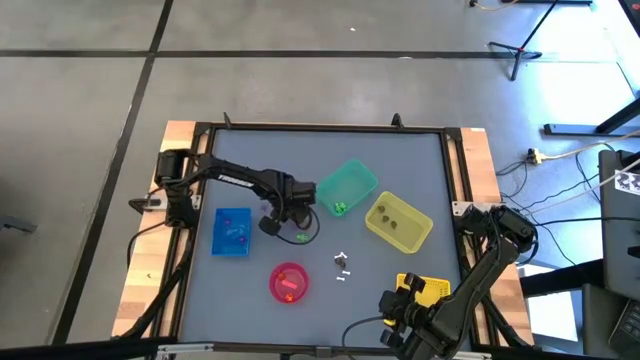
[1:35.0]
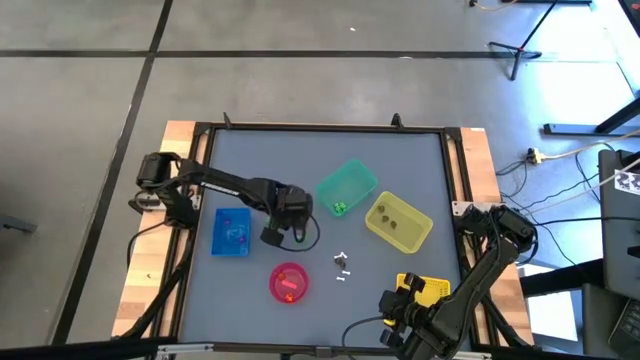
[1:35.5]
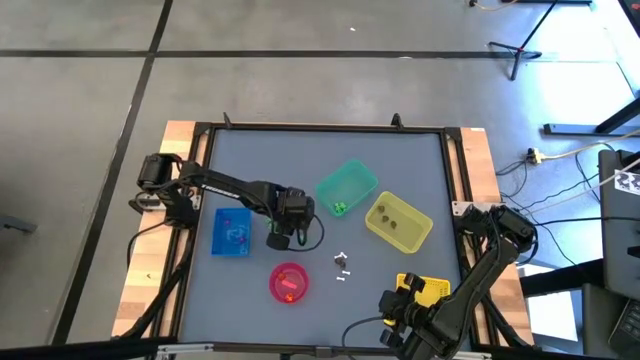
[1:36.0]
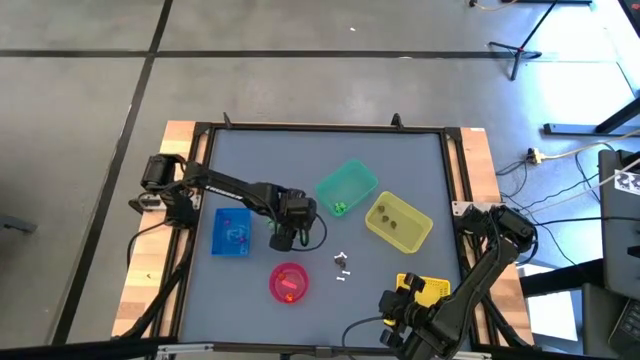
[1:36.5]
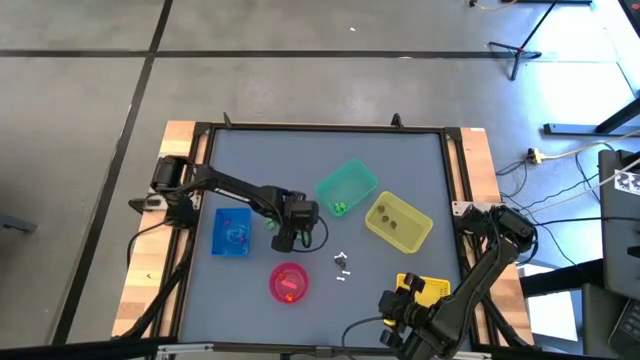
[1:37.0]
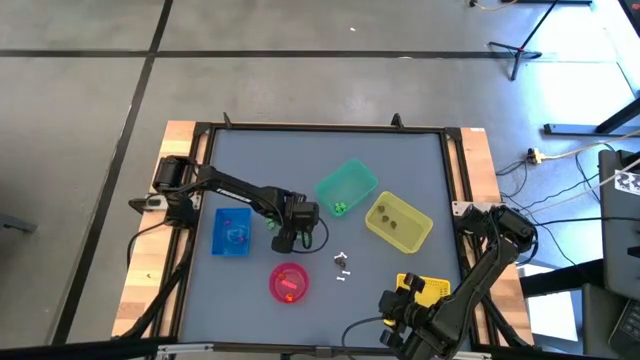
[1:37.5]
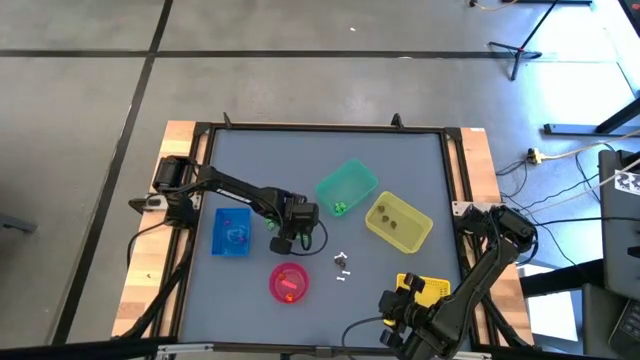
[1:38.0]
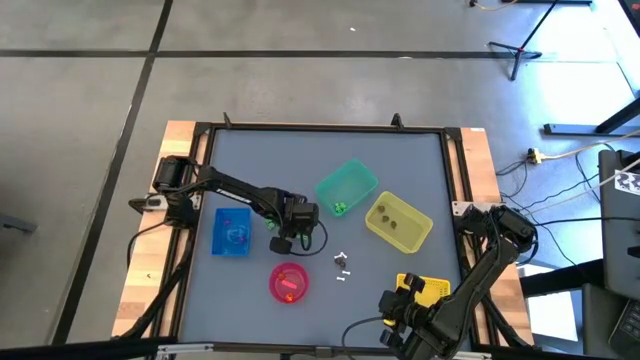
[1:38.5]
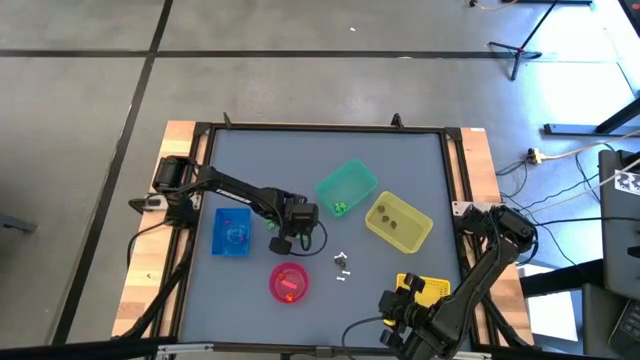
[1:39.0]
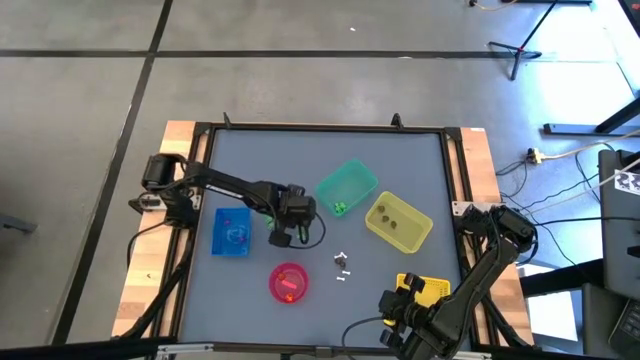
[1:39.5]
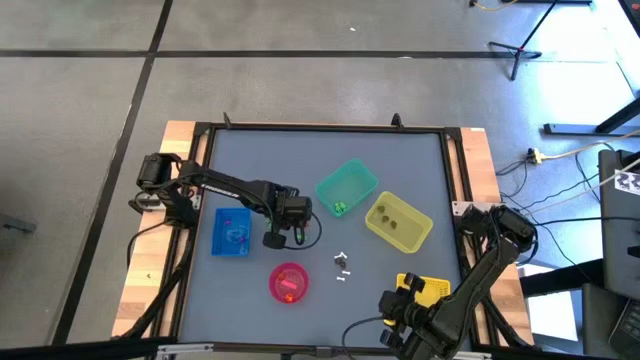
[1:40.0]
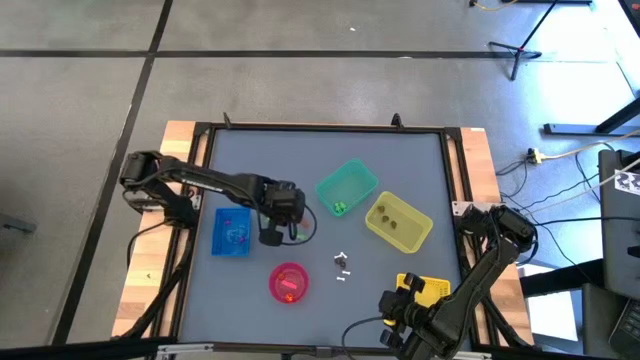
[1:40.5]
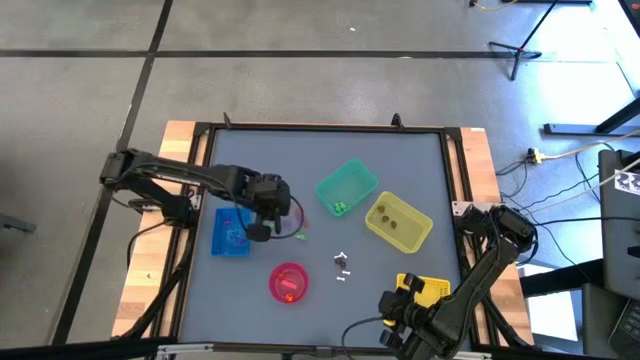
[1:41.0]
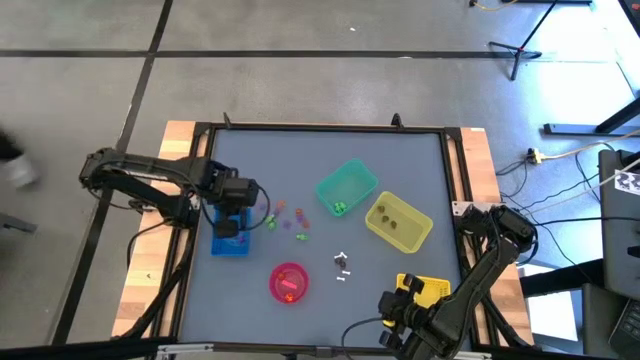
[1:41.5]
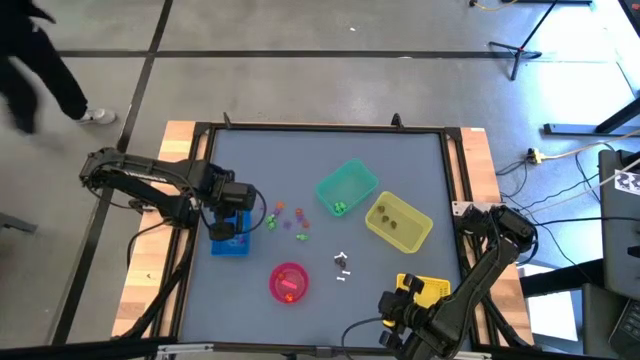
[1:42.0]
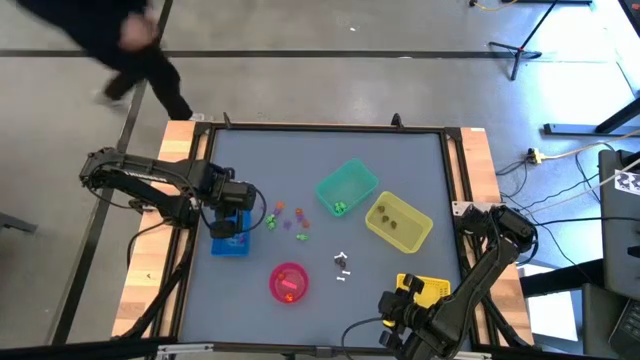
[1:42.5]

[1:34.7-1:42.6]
Task: Sort Halloween decoration
Put the violet spider toy into the blue bin

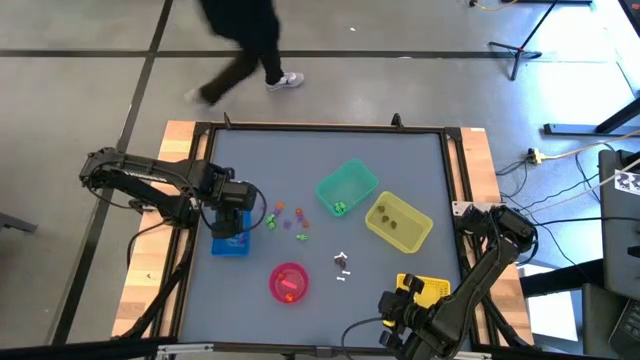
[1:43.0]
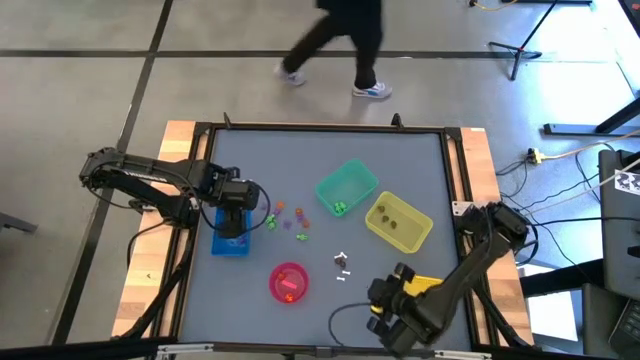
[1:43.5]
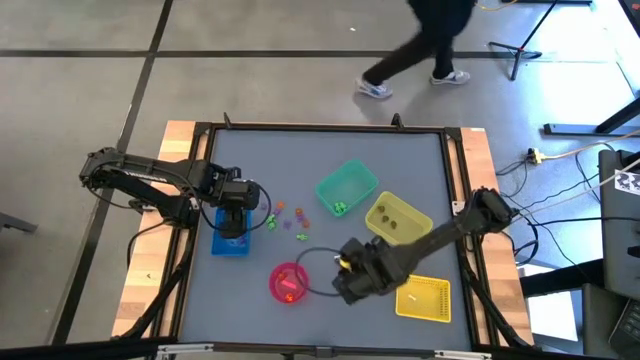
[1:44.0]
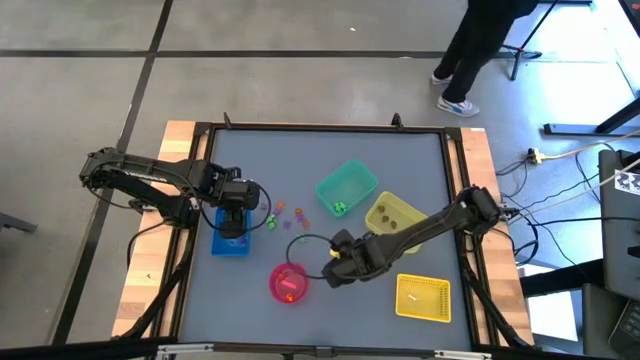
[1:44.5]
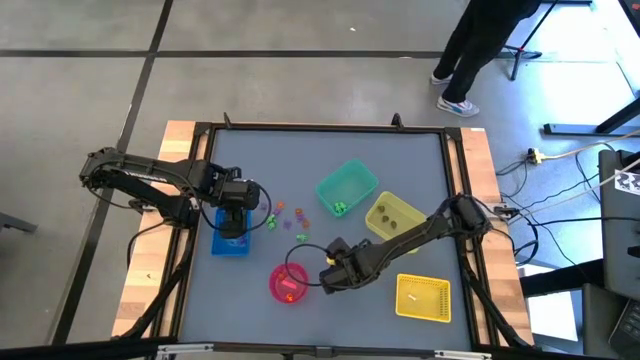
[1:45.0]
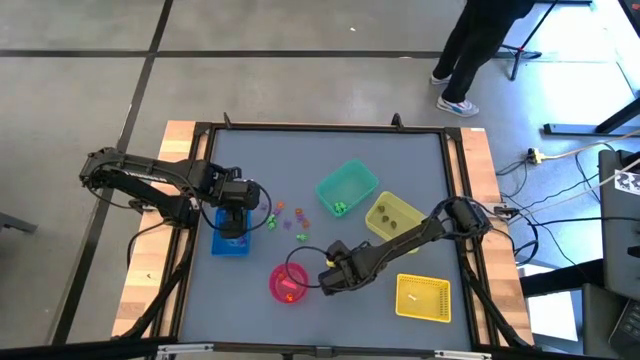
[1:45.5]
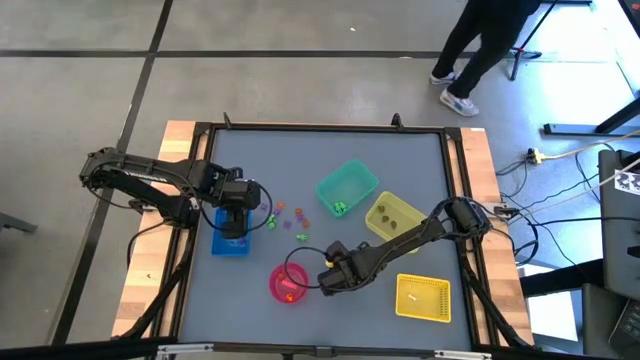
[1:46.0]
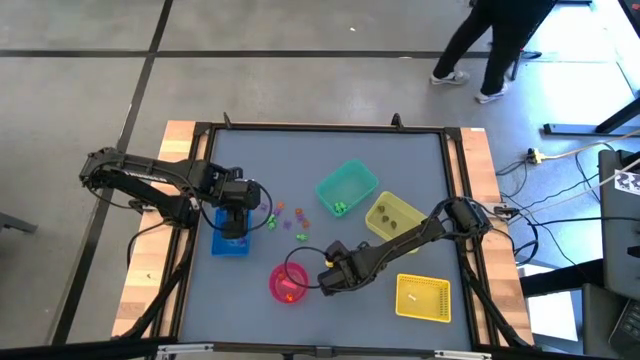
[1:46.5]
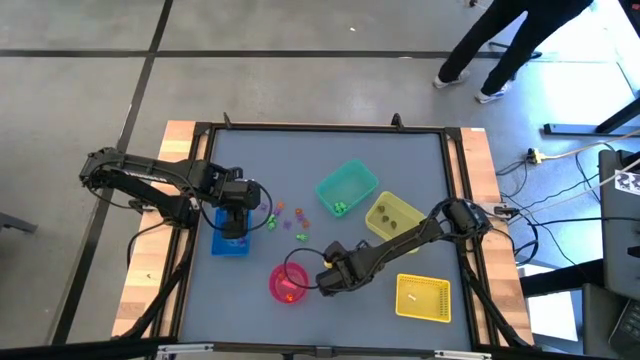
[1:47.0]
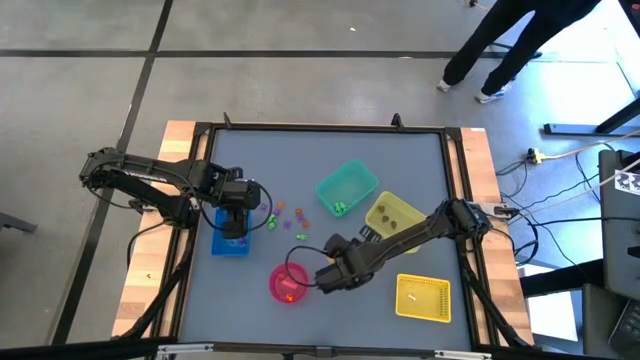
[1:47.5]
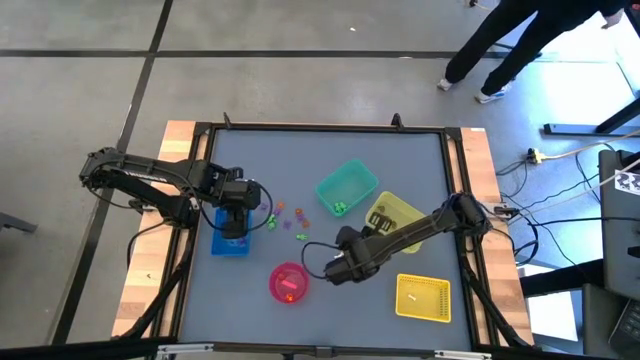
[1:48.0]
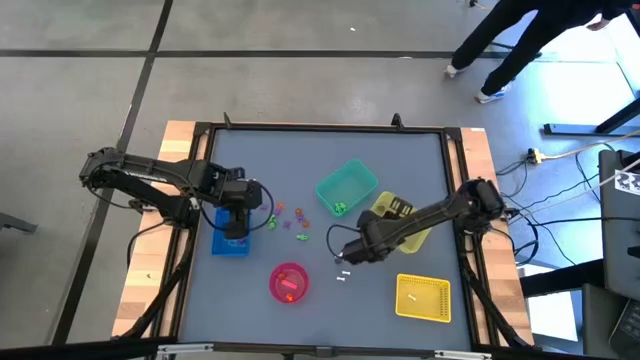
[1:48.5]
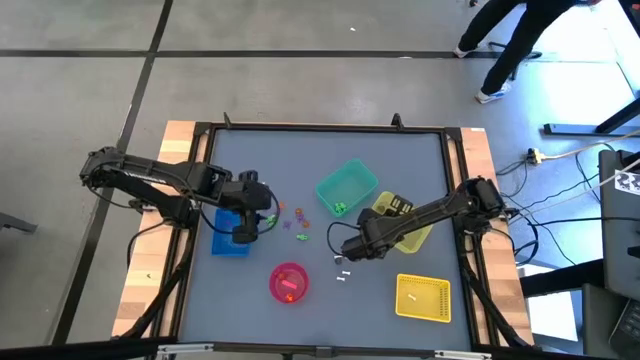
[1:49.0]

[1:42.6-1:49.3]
Put the black skull toy into the light yellow bin

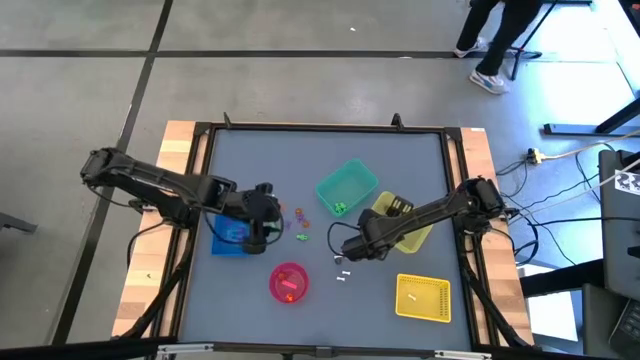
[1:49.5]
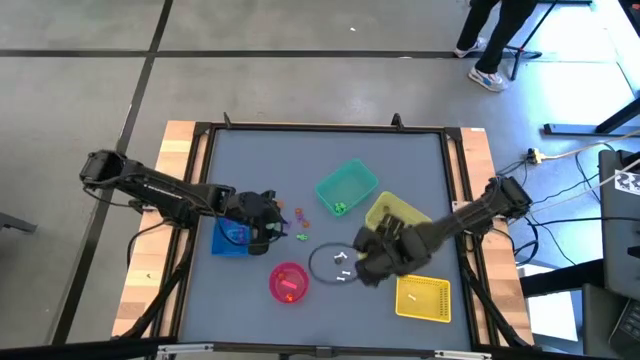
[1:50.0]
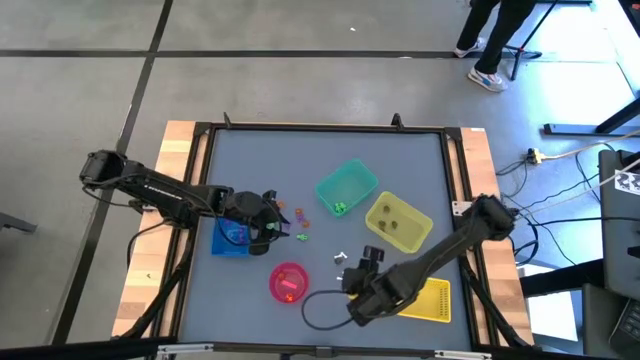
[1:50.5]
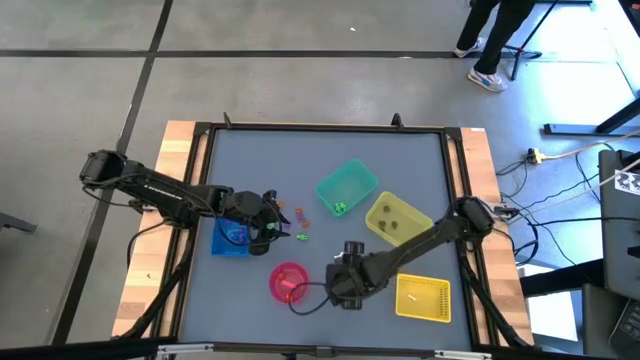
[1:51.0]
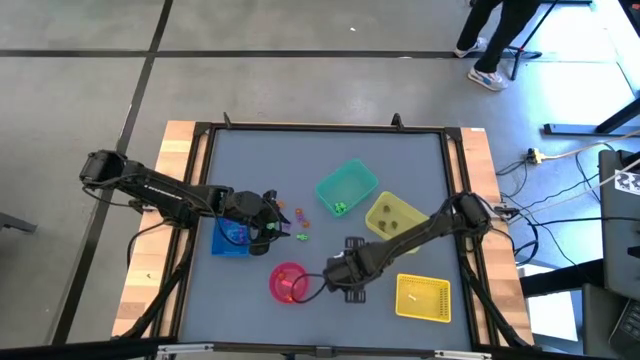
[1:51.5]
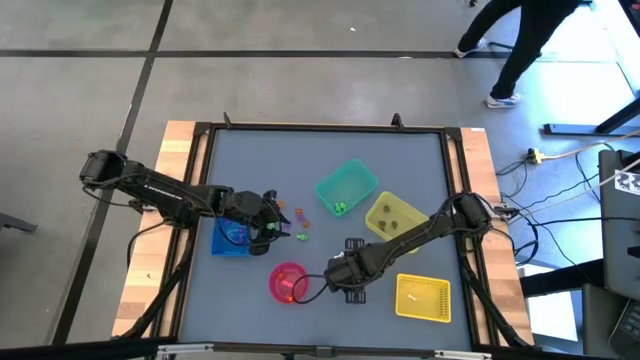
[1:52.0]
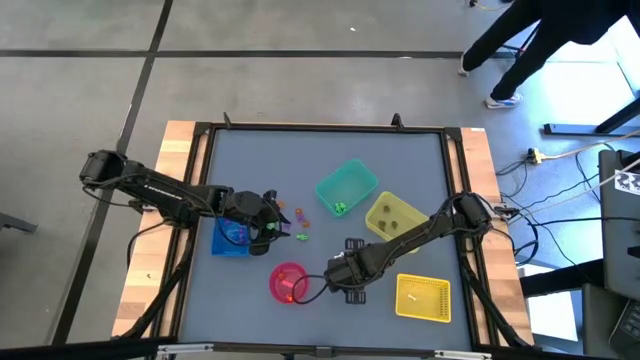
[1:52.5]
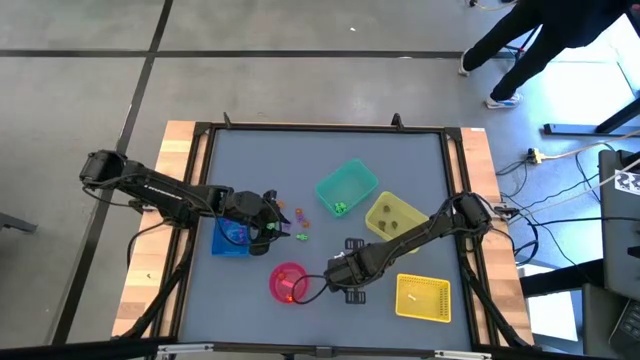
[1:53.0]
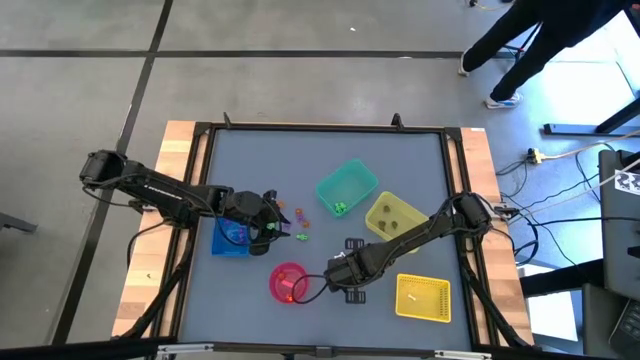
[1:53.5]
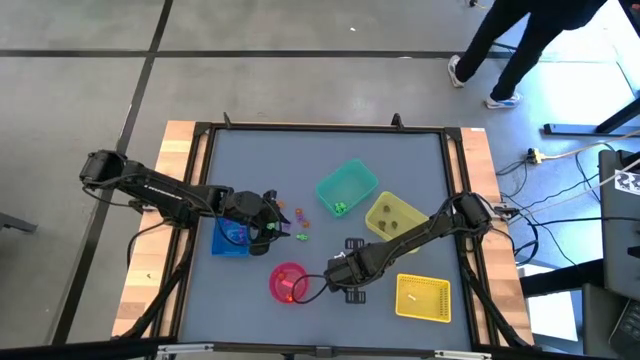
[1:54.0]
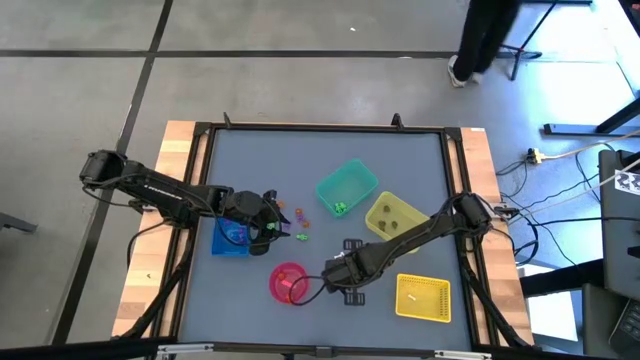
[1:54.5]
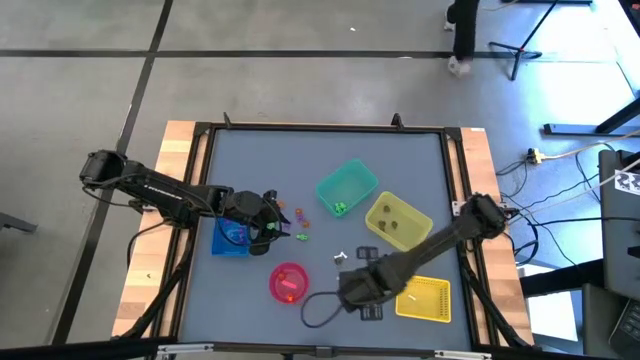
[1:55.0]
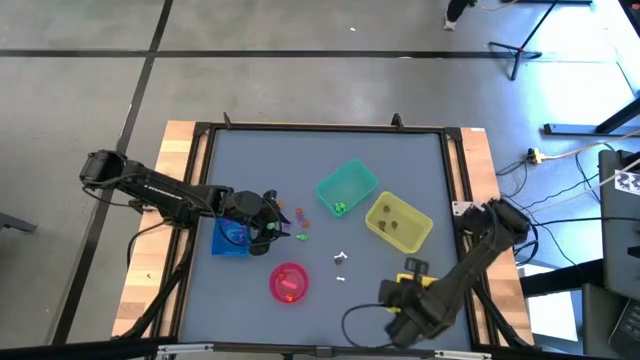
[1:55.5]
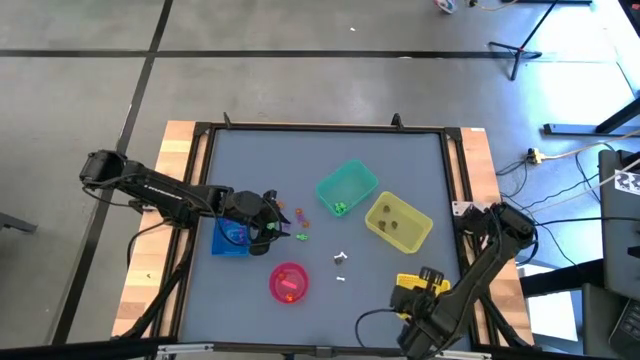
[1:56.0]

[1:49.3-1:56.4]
Put the white bone toy into the yellow bin
